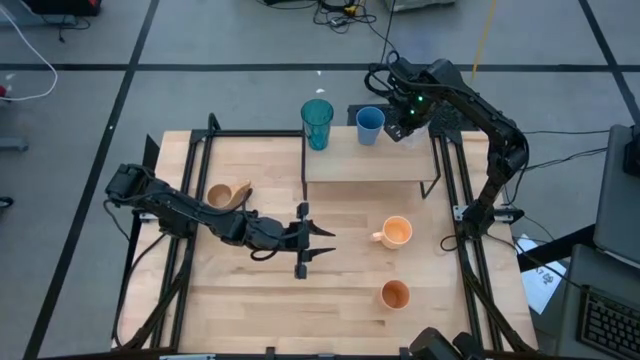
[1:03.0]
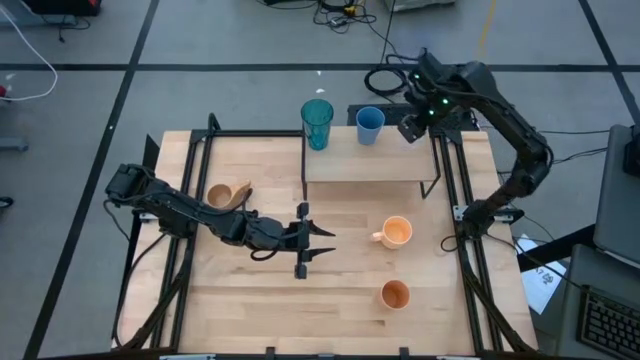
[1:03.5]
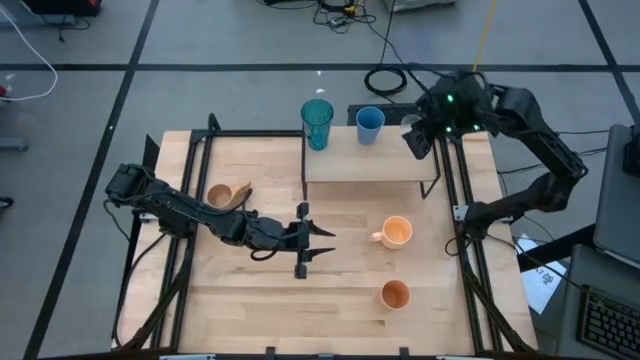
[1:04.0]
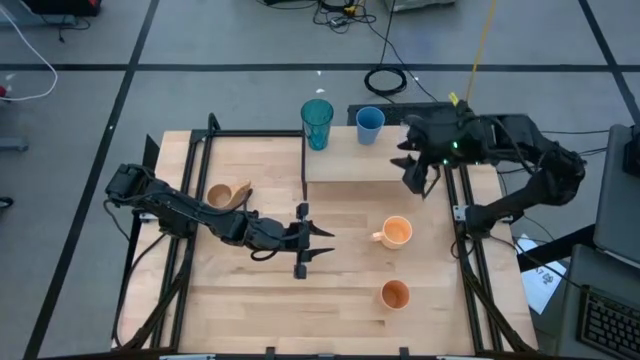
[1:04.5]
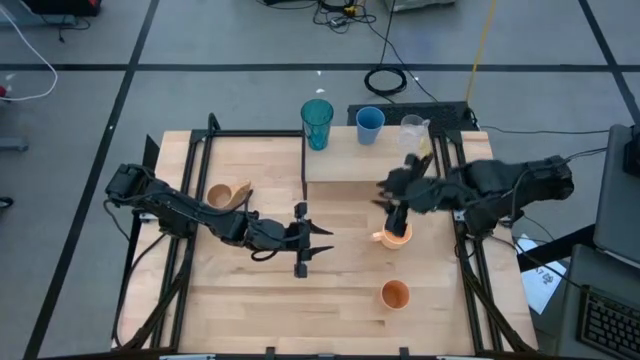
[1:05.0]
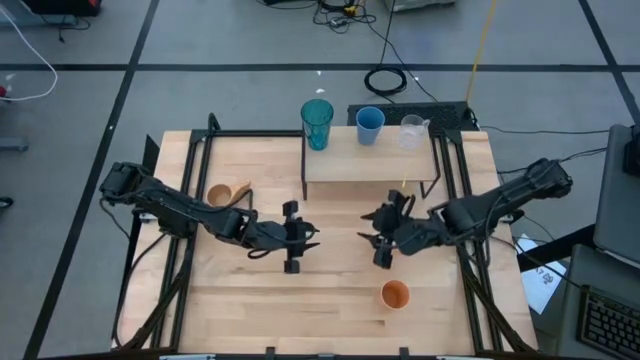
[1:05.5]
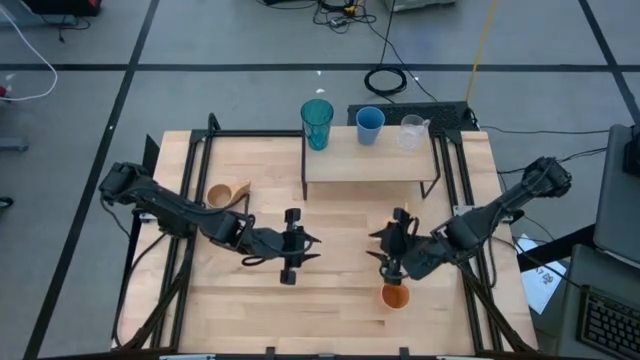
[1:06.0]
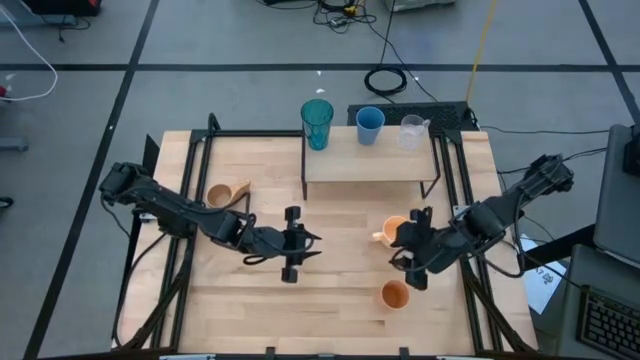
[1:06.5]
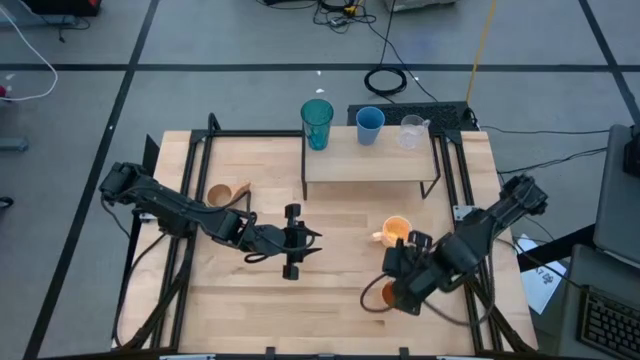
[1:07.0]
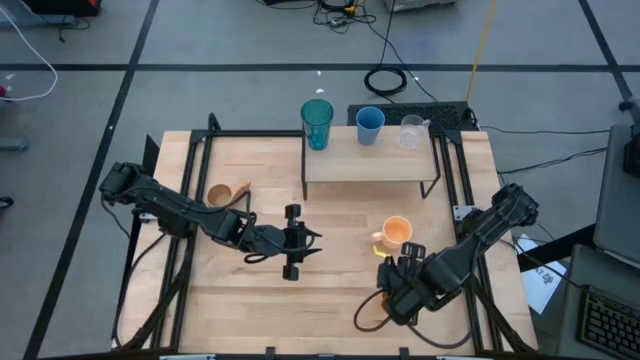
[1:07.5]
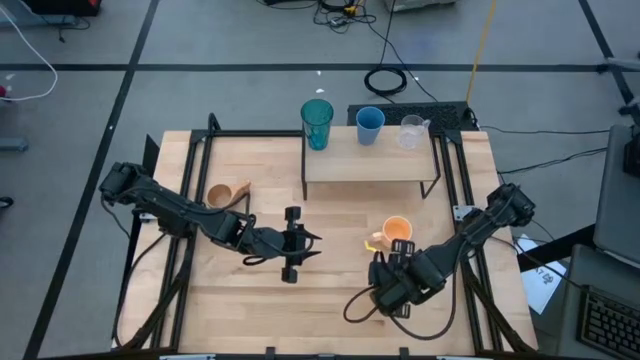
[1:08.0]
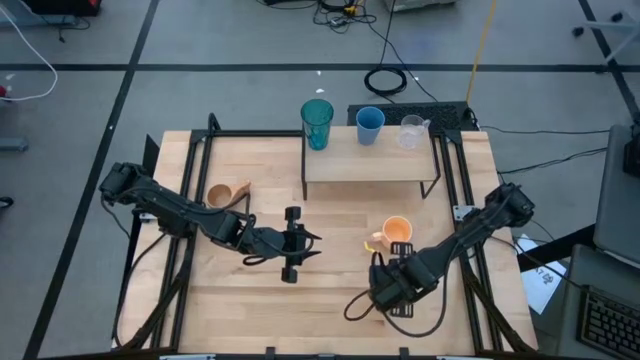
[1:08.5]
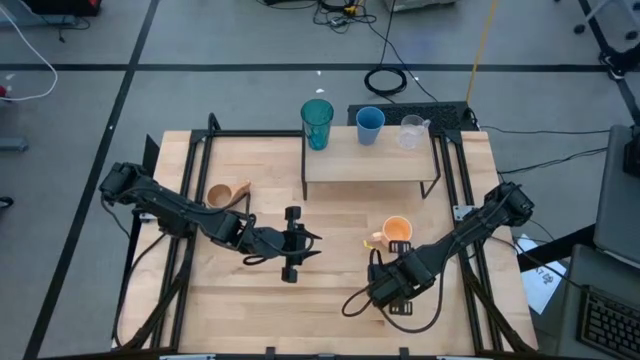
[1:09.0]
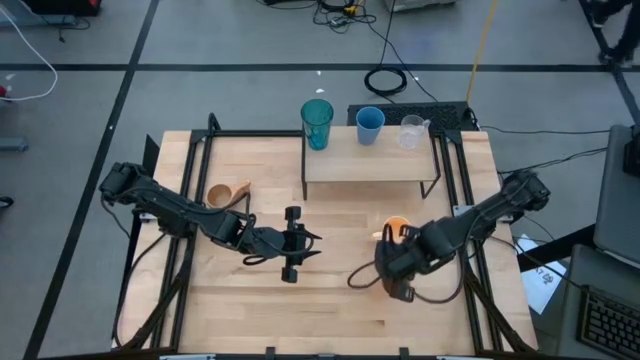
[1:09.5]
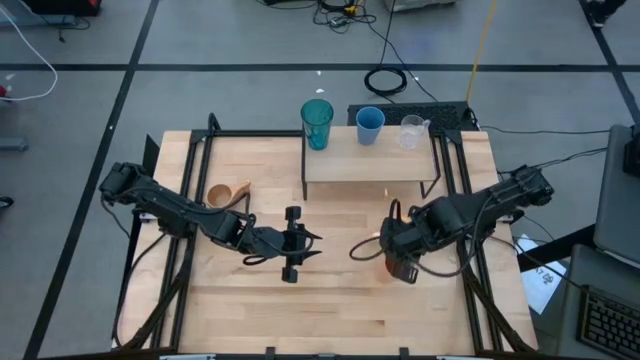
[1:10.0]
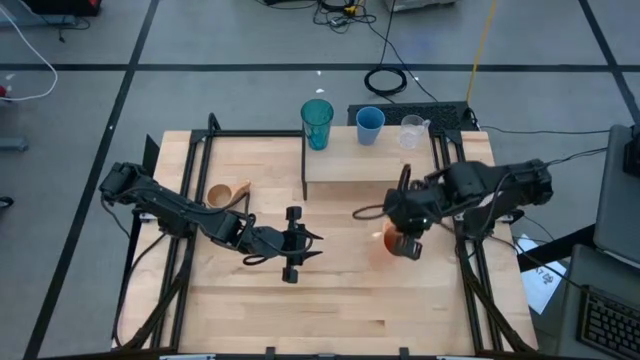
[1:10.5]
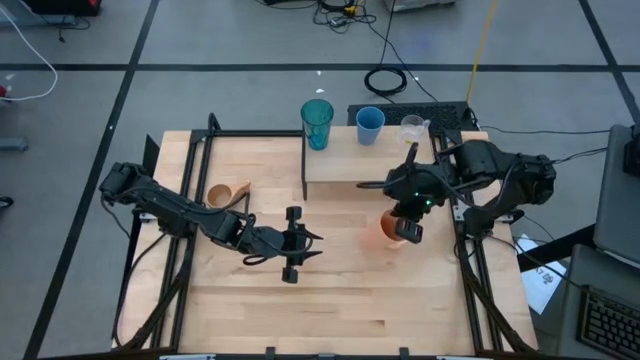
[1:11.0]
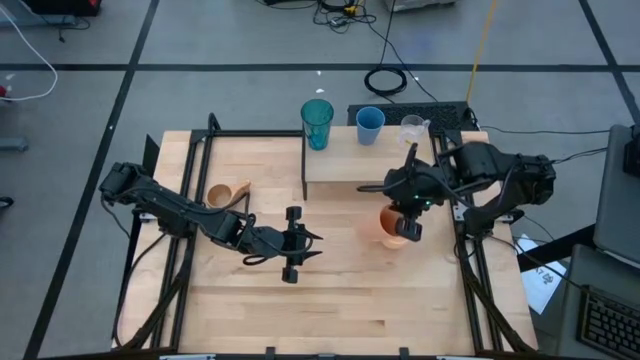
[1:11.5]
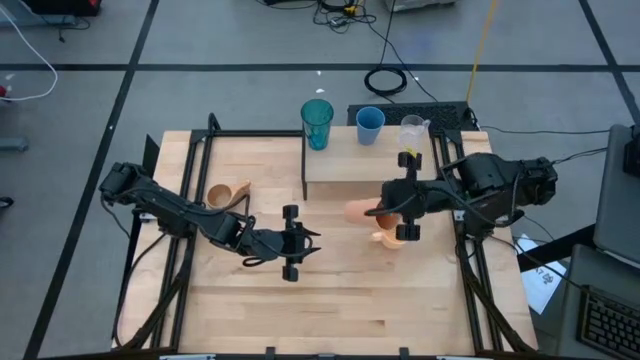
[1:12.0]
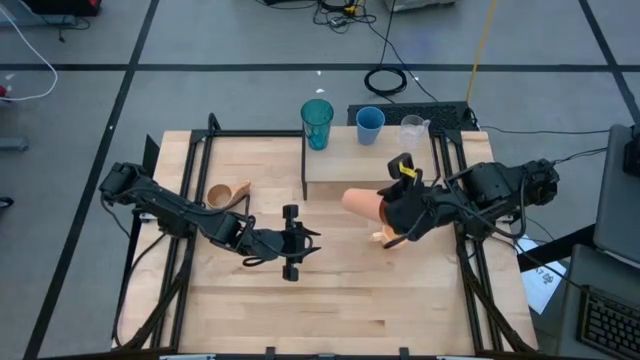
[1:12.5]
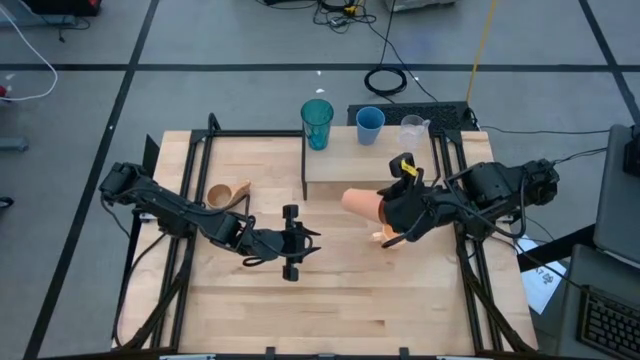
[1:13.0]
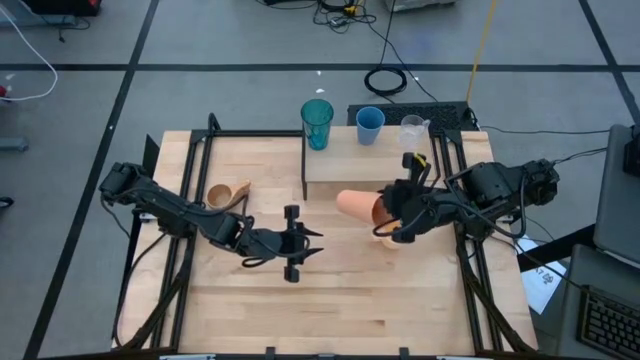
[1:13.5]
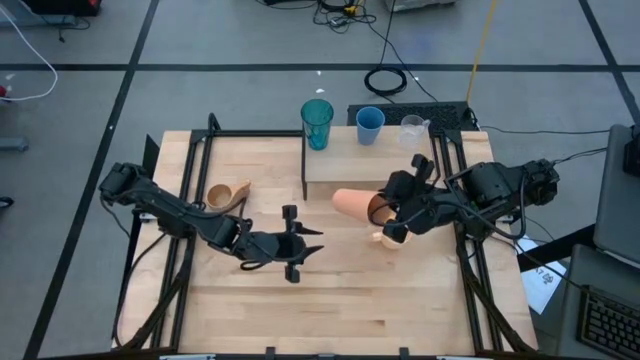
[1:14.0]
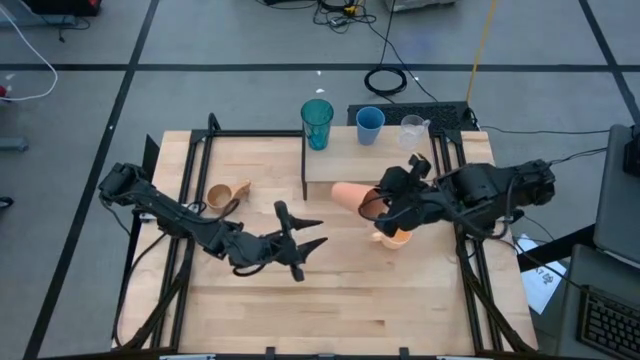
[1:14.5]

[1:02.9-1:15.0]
Task: Stack small to large cups/mugs on shelf
Put the orange cup on the shelf

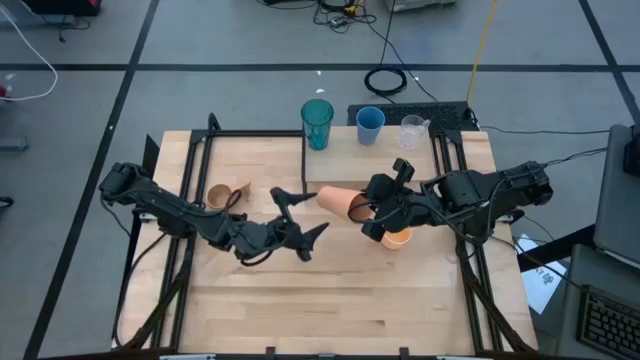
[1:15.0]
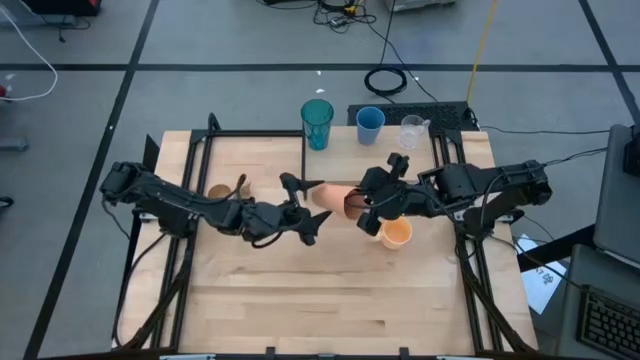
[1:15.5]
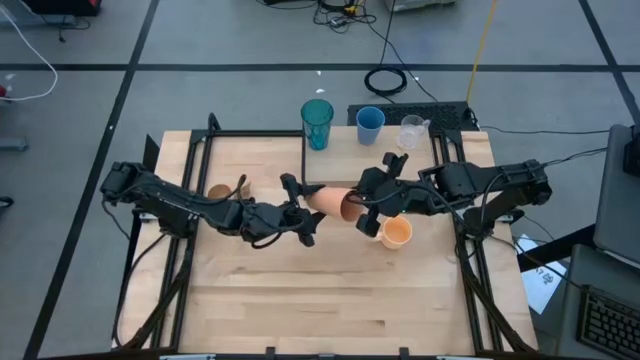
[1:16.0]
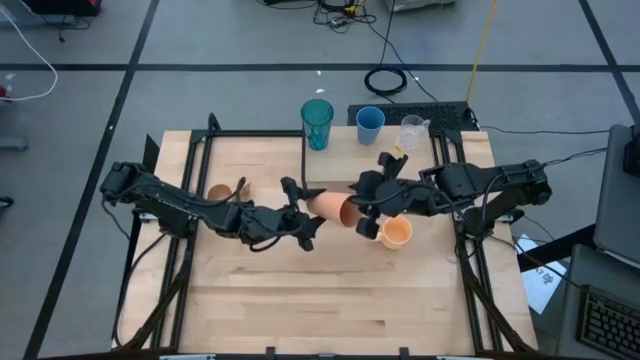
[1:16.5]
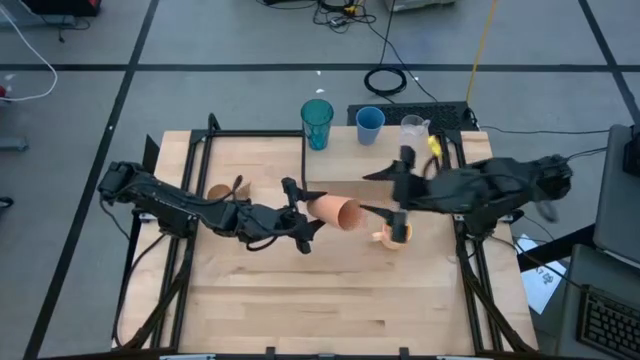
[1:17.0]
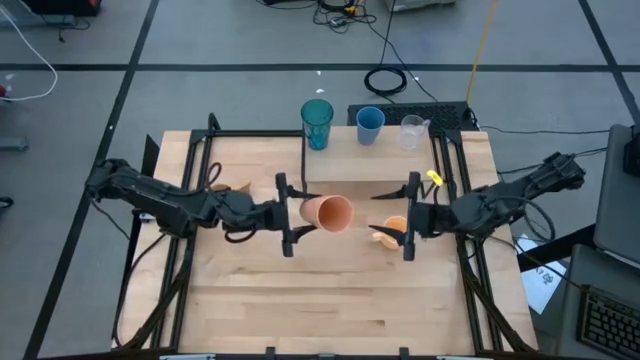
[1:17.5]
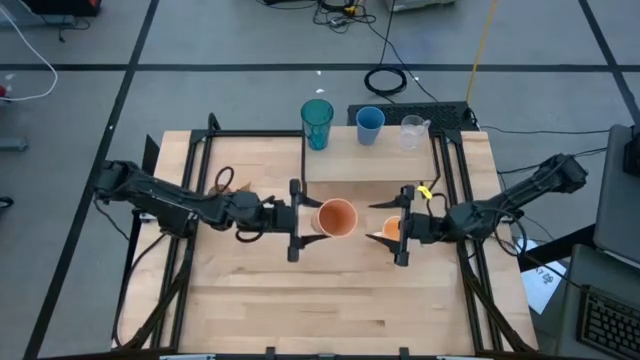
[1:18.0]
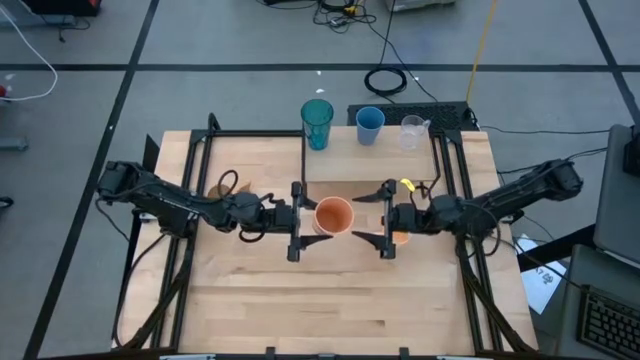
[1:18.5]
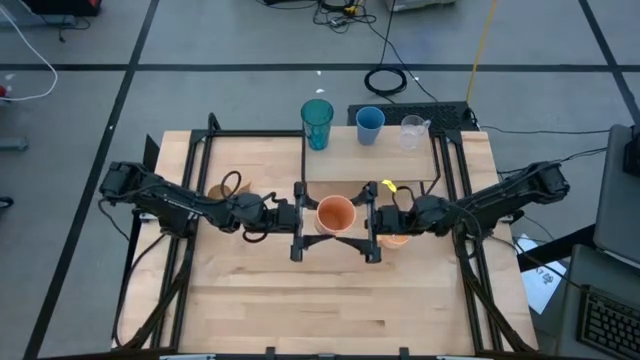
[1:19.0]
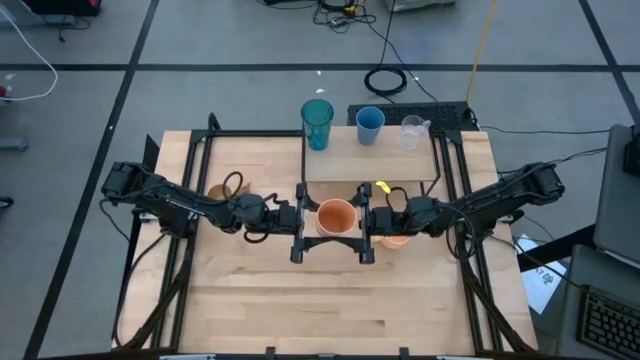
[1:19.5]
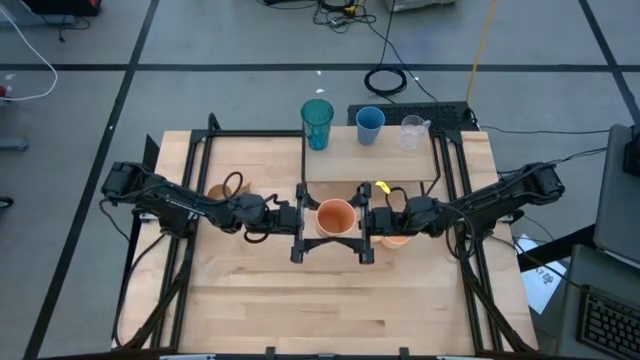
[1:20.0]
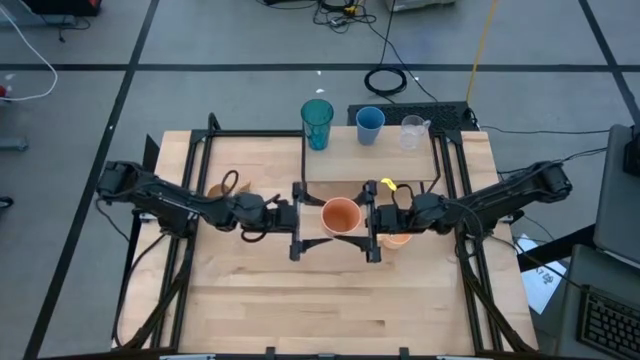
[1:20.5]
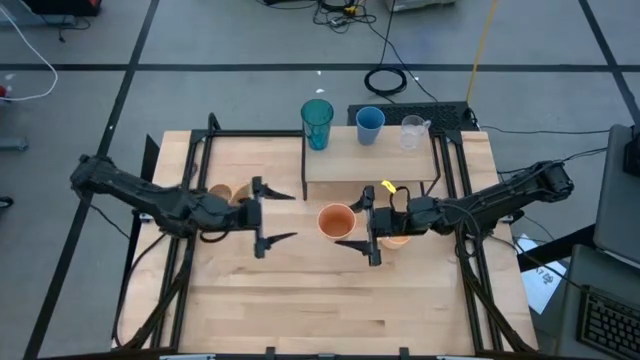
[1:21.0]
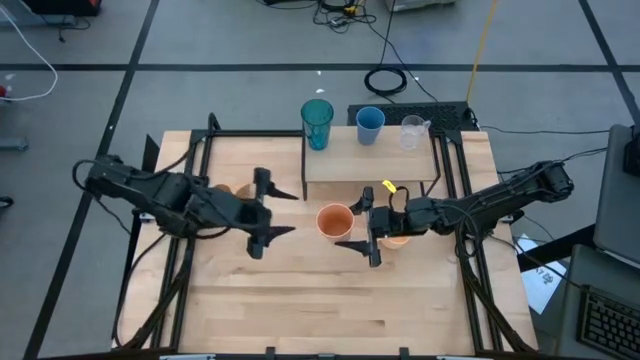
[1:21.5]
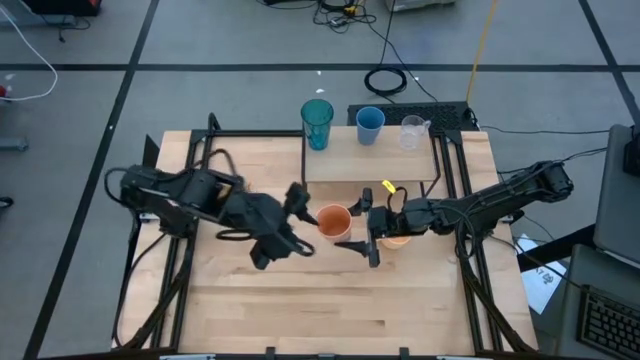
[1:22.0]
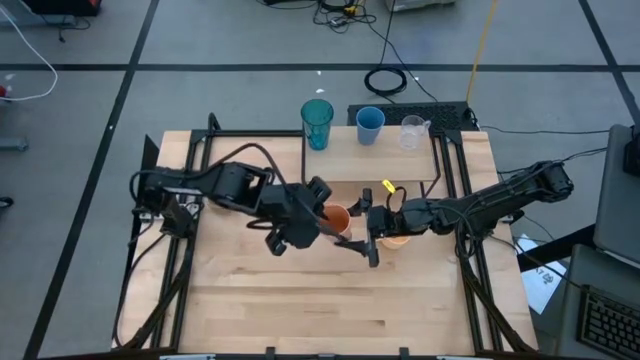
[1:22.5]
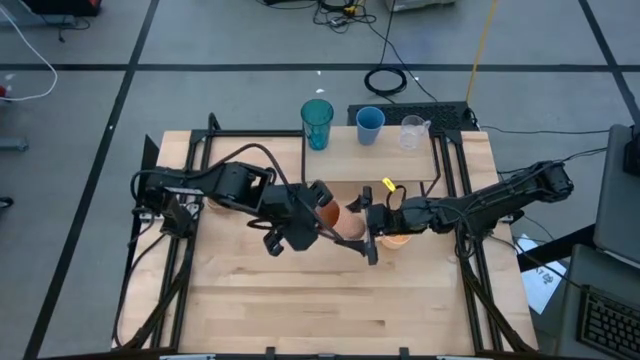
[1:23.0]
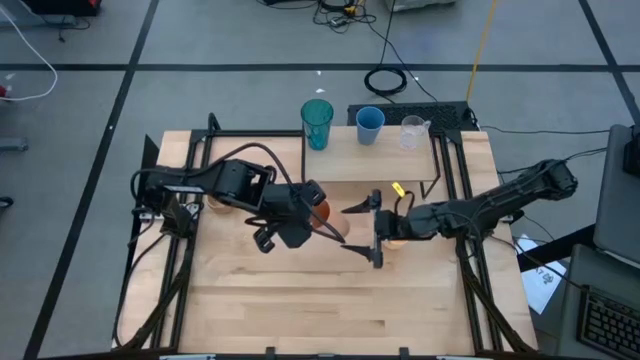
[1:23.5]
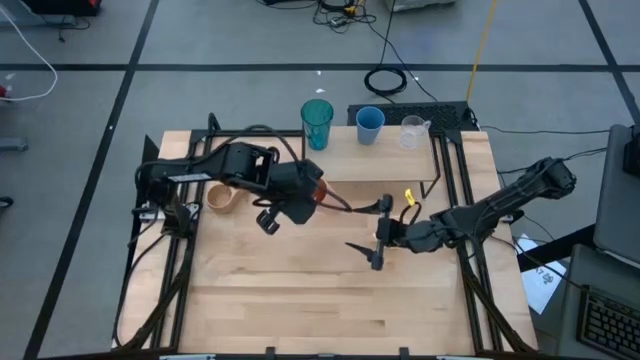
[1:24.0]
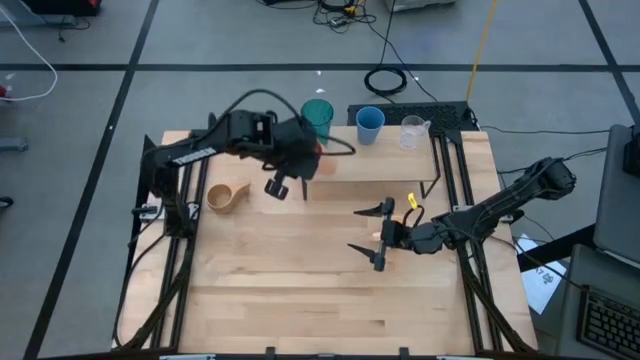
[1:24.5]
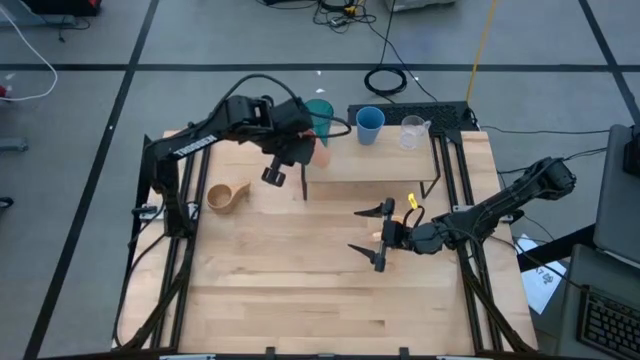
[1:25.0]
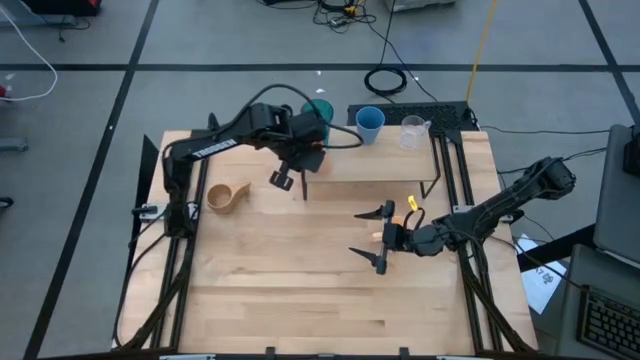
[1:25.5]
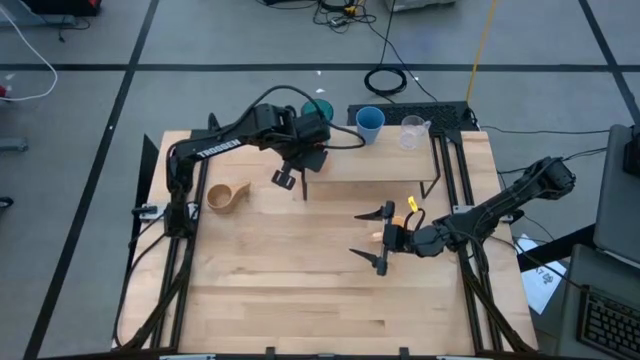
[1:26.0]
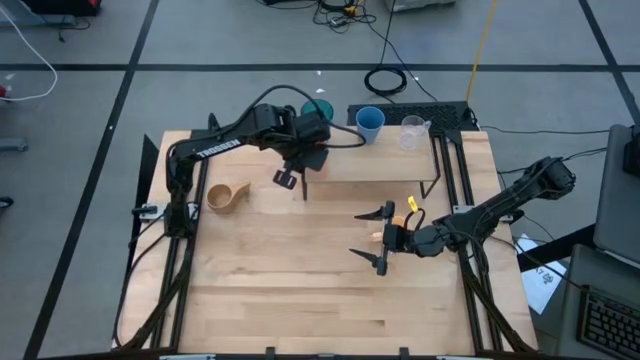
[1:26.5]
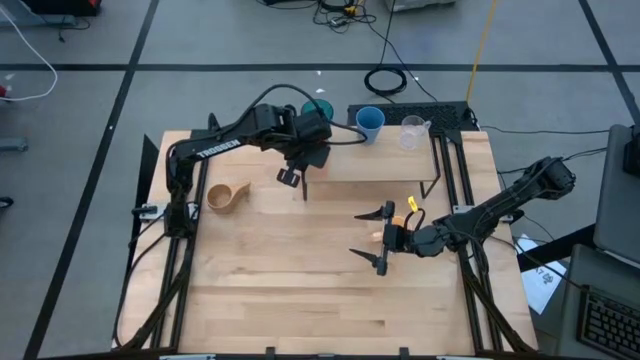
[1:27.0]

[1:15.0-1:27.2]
Put the orange cup on the shelf
